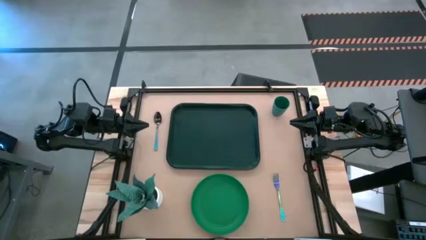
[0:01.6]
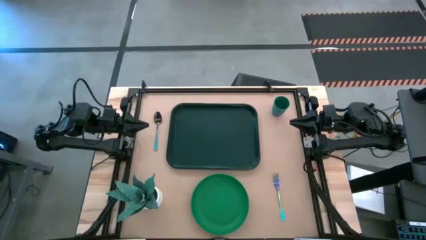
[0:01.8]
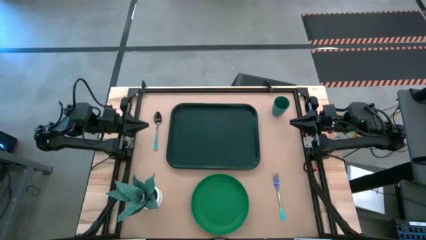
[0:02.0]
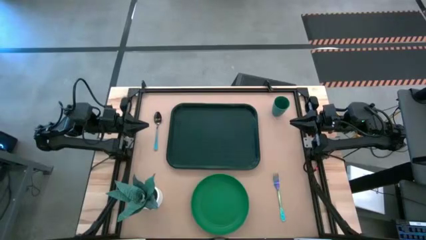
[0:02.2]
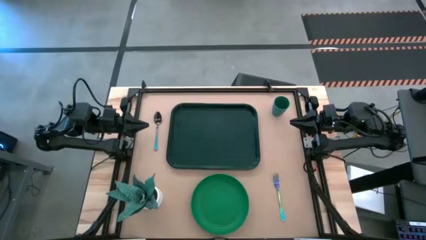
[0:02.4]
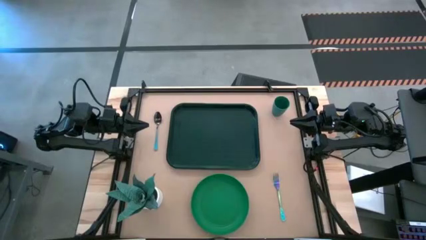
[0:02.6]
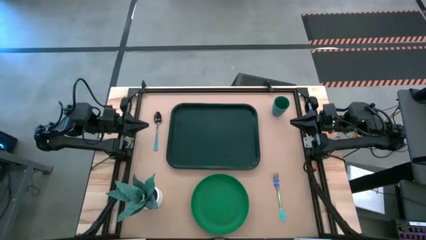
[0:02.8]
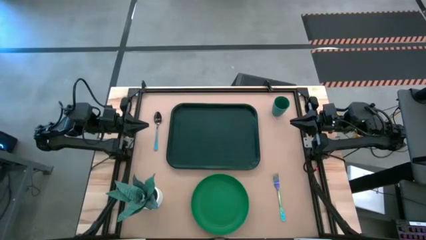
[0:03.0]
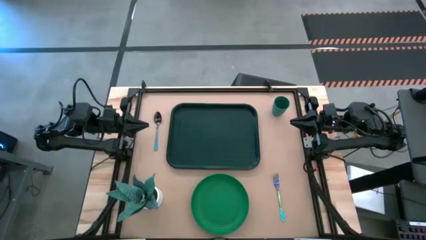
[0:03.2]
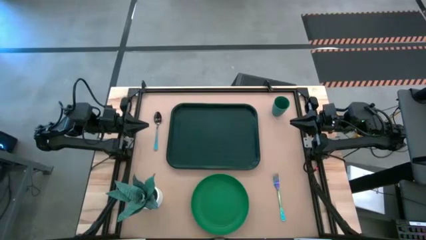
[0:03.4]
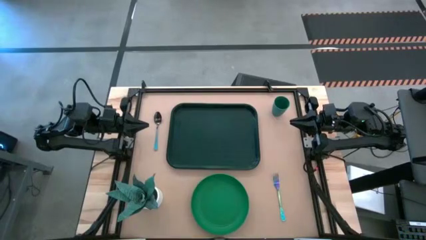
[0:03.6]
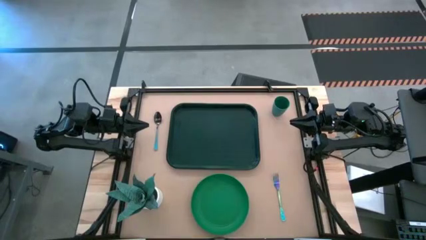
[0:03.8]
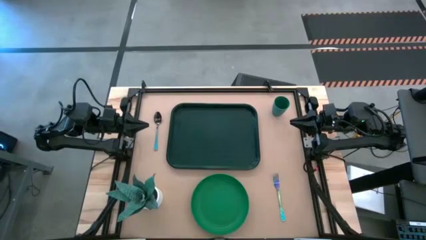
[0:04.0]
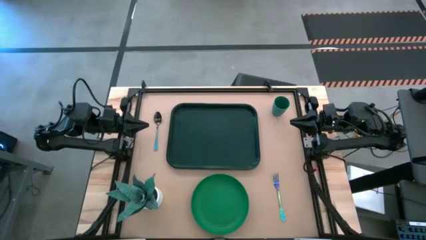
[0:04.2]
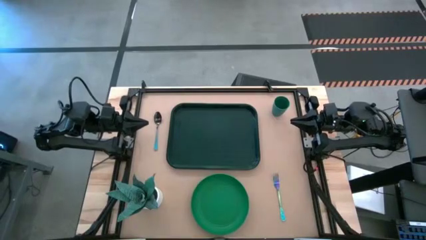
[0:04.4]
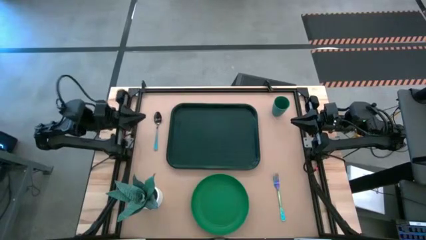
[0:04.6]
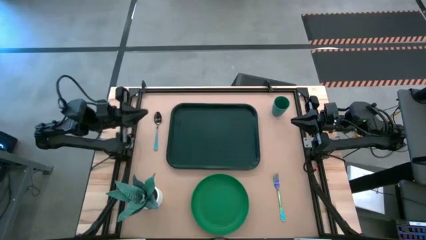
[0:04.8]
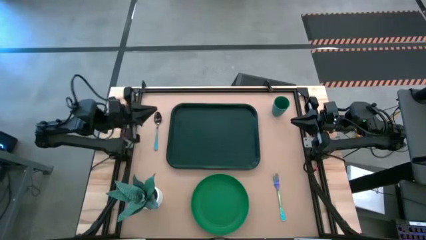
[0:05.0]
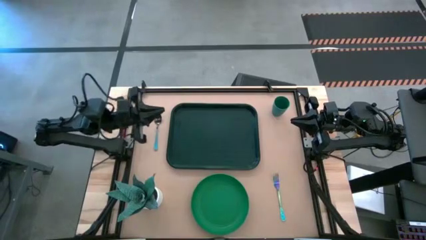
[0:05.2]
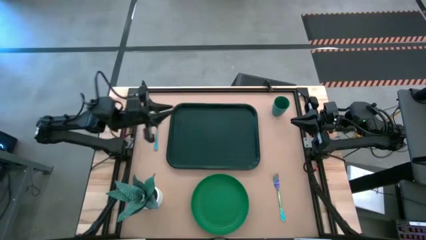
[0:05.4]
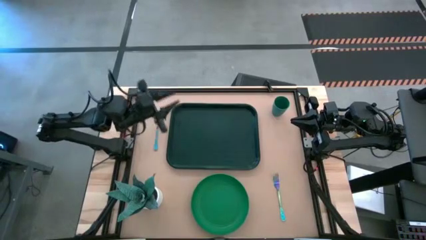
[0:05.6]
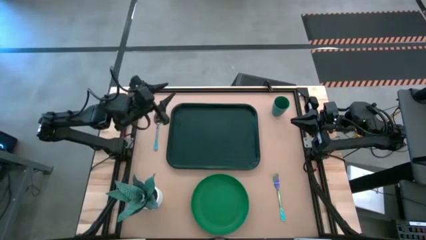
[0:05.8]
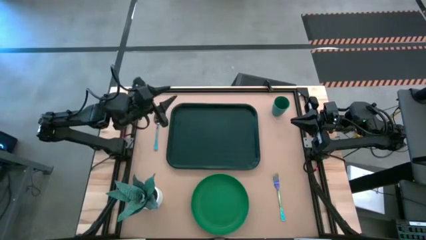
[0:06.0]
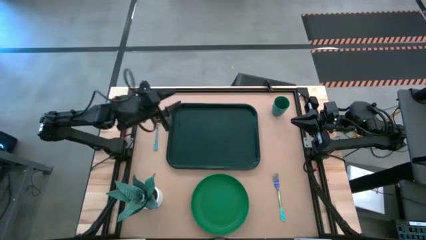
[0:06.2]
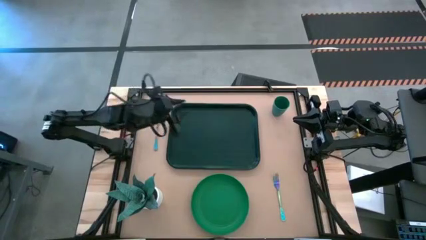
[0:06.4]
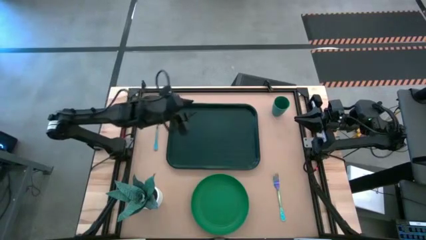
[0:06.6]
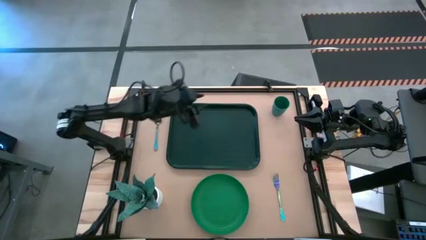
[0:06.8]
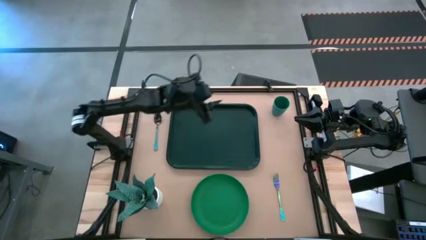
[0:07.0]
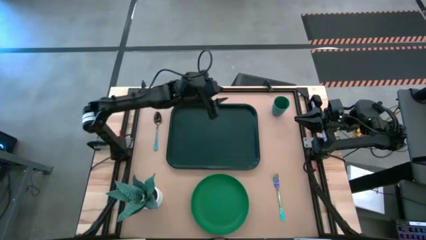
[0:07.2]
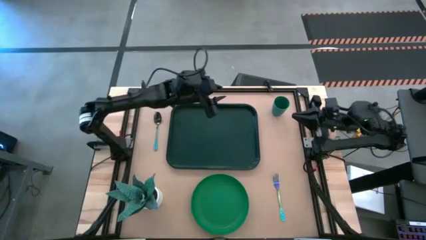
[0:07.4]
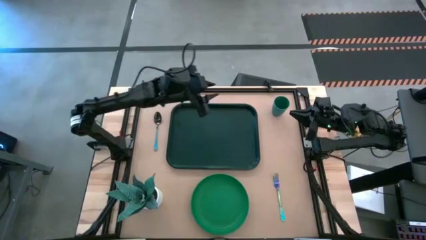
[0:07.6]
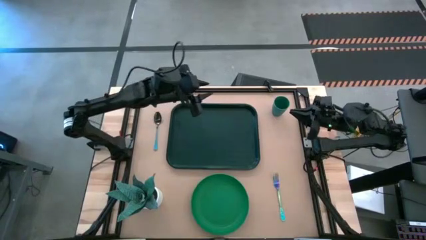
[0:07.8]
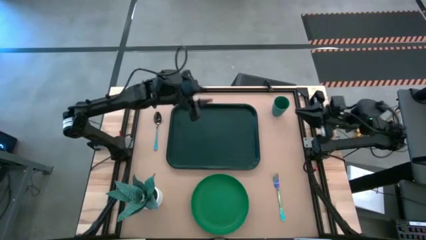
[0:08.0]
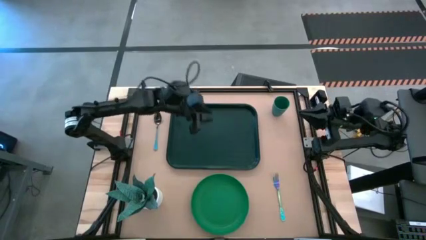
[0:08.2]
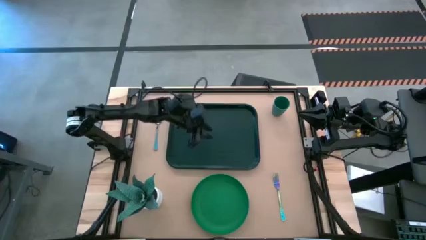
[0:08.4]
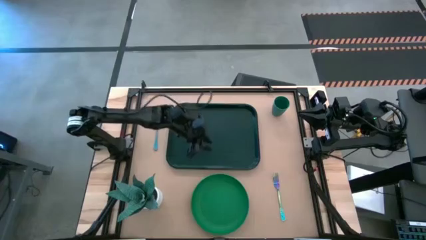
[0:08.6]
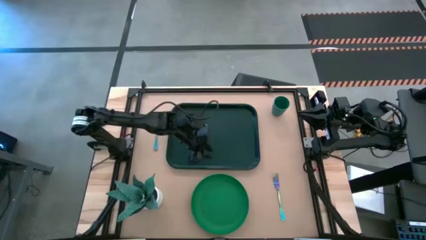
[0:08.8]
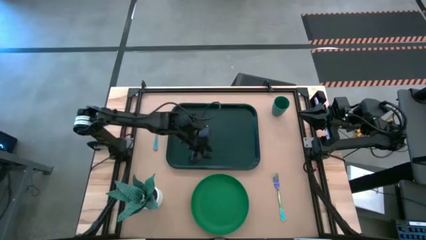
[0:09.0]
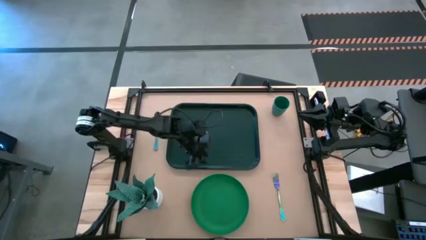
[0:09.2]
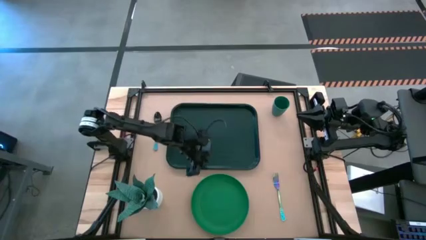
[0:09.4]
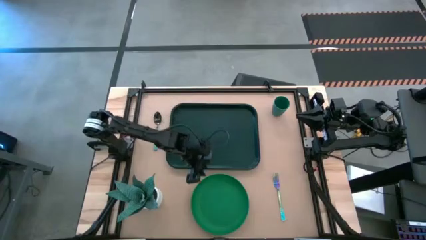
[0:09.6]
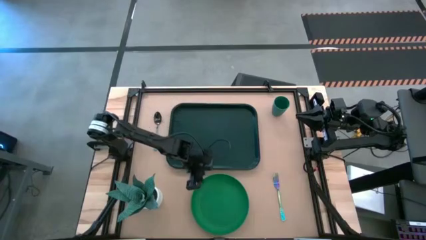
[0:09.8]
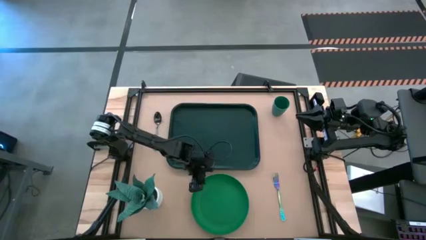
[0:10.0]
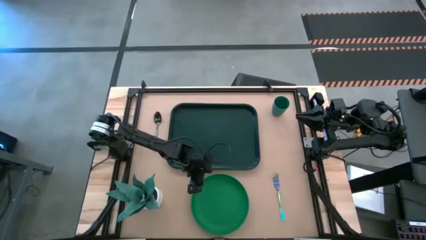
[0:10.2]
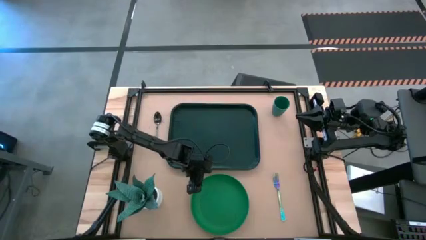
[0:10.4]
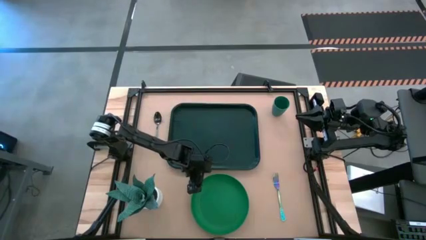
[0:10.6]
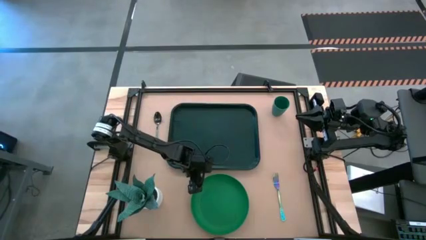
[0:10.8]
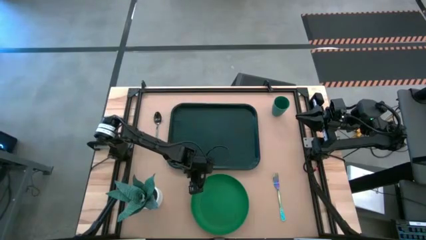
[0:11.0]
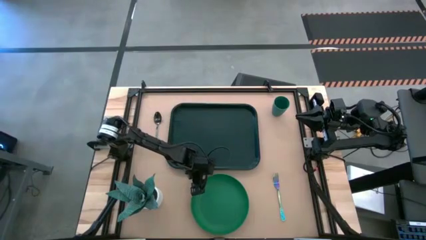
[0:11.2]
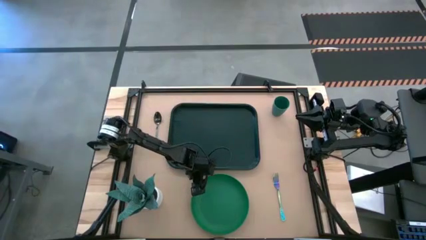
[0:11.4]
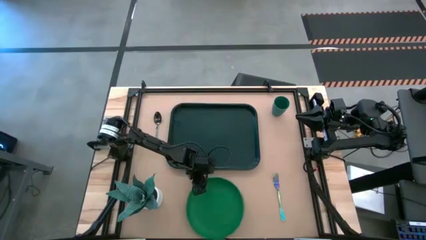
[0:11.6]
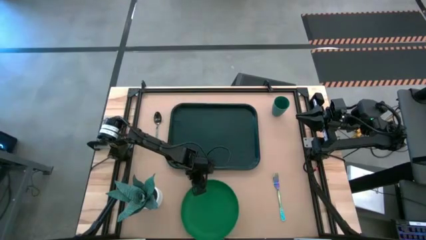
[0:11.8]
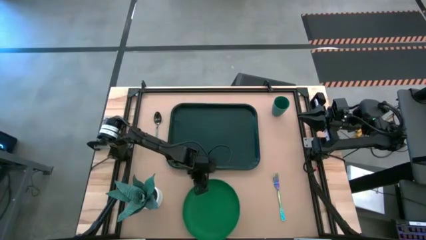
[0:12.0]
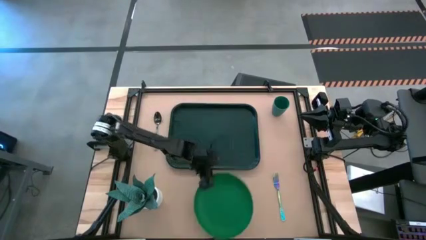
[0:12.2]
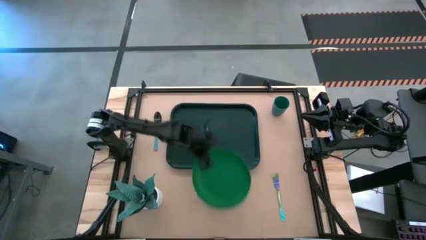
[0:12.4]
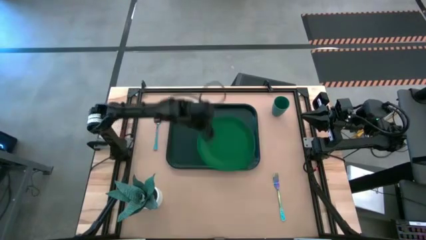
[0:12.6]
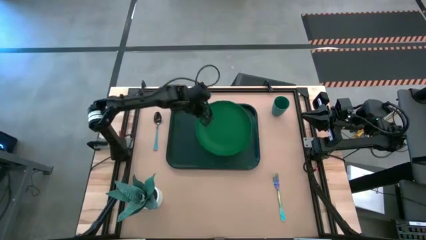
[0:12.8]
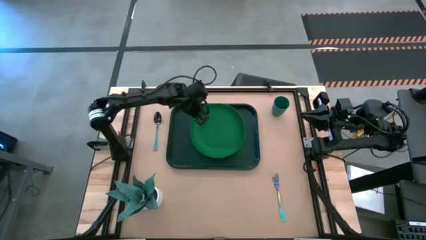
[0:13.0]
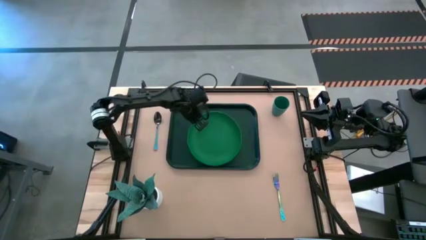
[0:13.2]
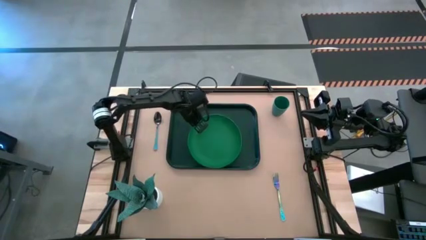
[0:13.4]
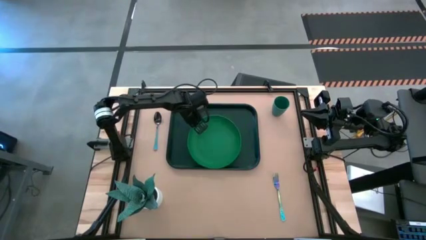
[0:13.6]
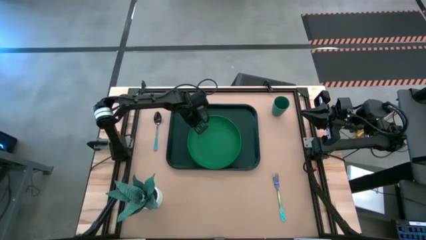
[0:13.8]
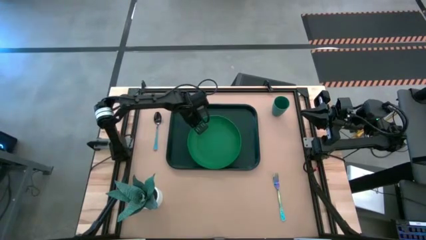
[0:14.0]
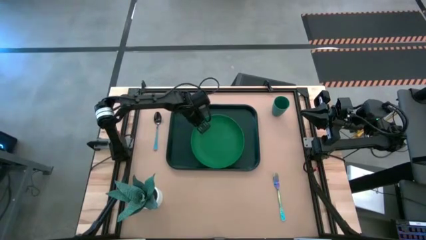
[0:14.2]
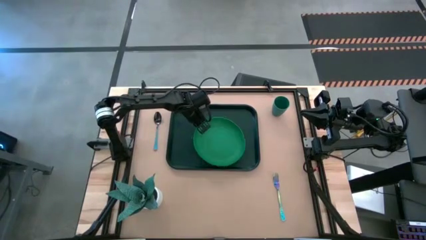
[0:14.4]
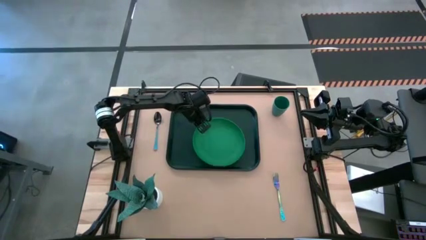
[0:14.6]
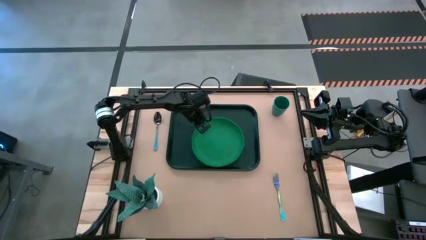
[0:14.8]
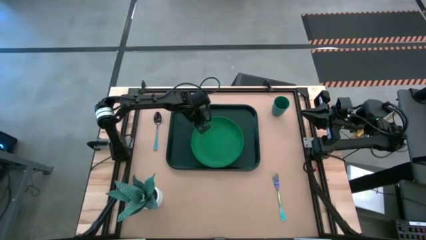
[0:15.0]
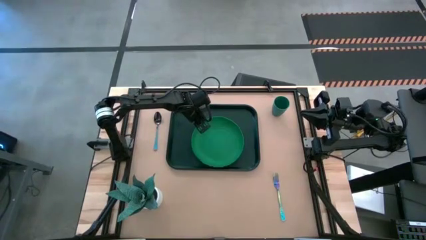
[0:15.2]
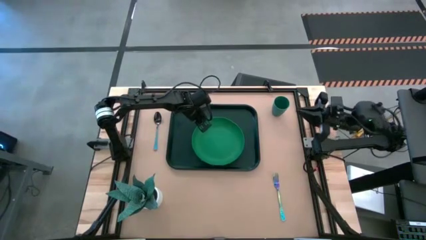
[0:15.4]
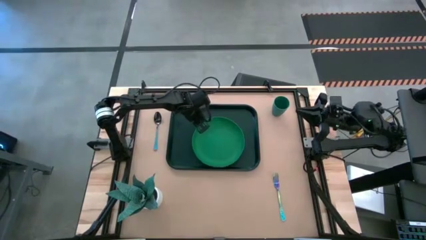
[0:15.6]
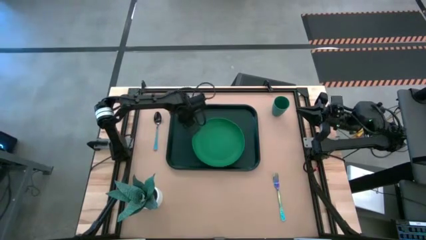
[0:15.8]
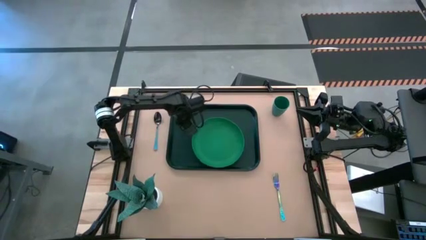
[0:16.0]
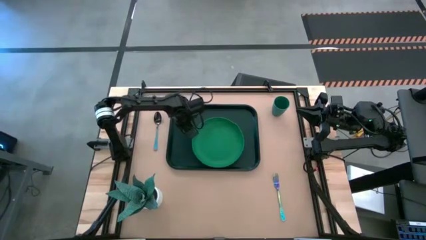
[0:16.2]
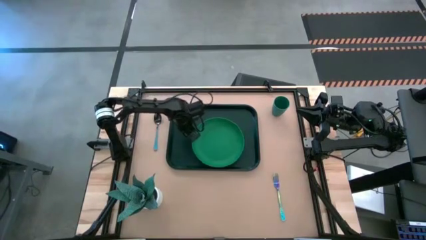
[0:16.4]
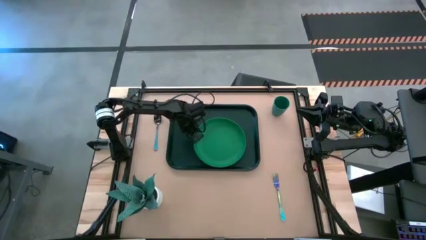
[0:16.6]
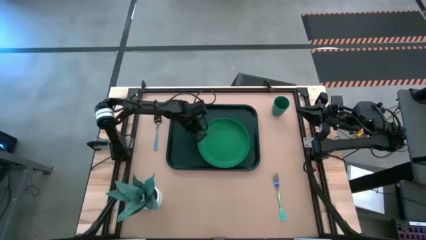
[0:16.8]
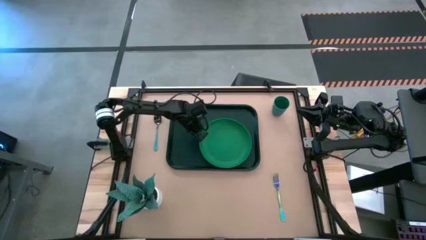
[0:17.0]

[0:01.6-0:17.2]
Task: Pick and place plate/cup/fork/spoon on tray
Put the green plate on the dark green tray
